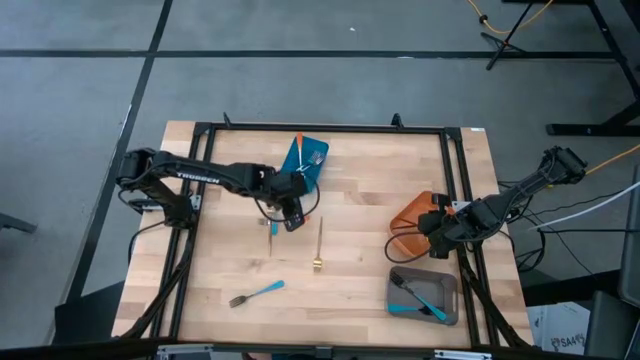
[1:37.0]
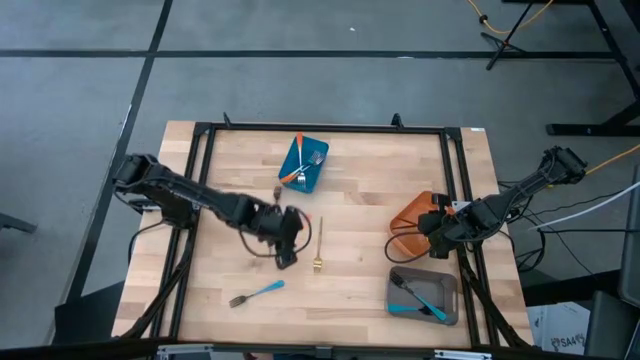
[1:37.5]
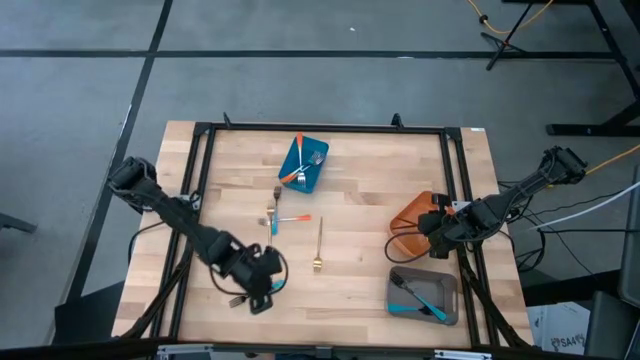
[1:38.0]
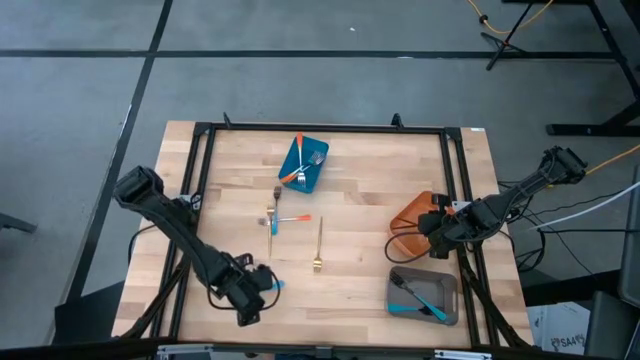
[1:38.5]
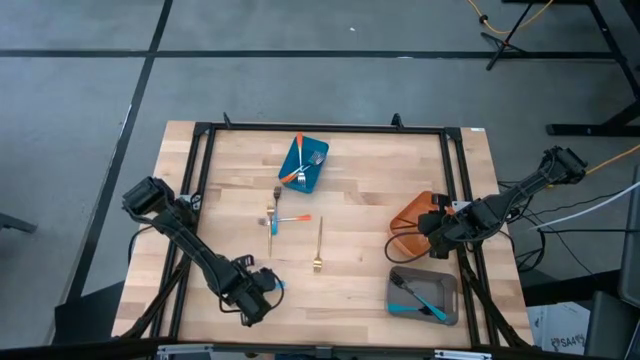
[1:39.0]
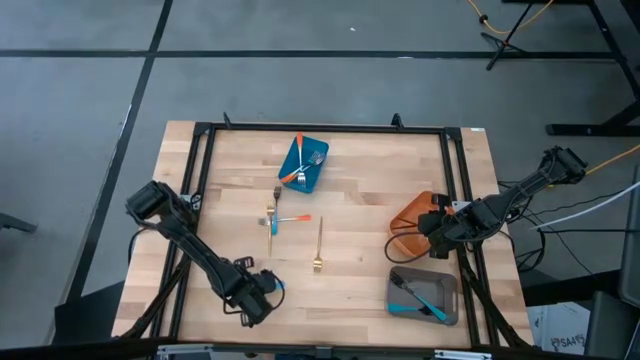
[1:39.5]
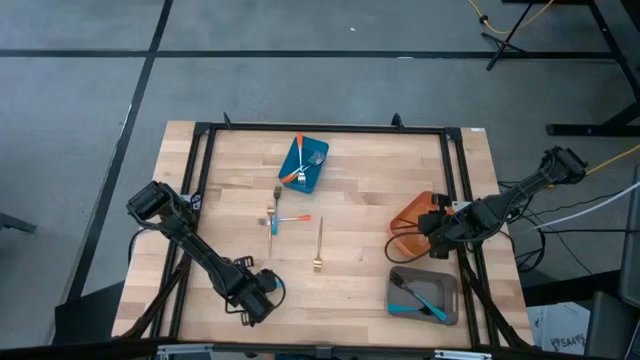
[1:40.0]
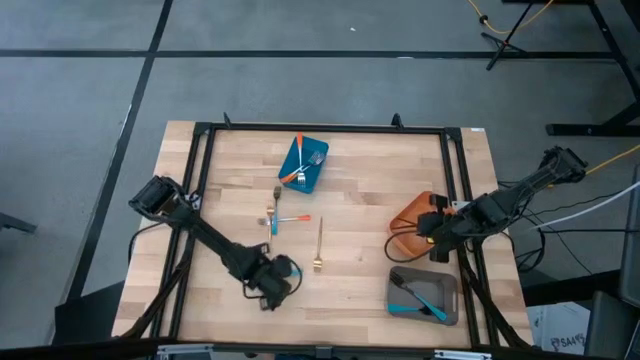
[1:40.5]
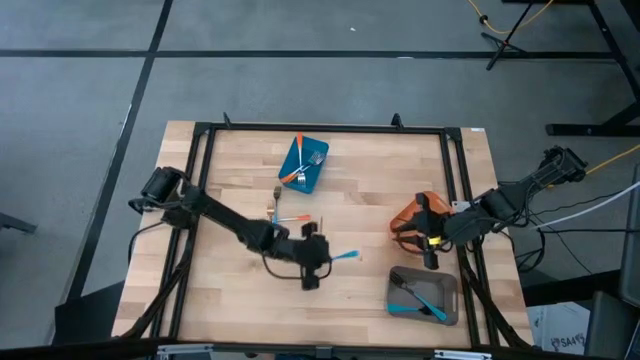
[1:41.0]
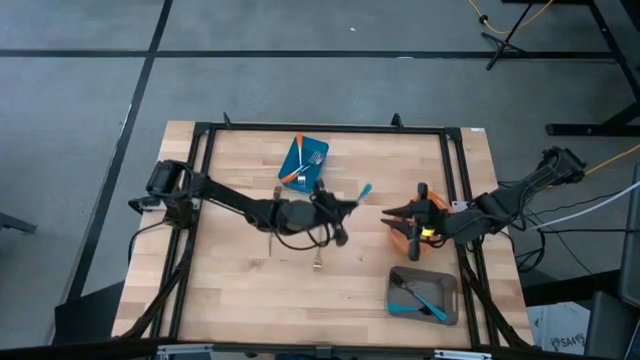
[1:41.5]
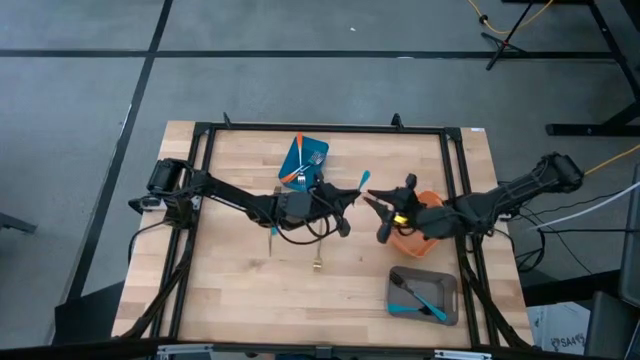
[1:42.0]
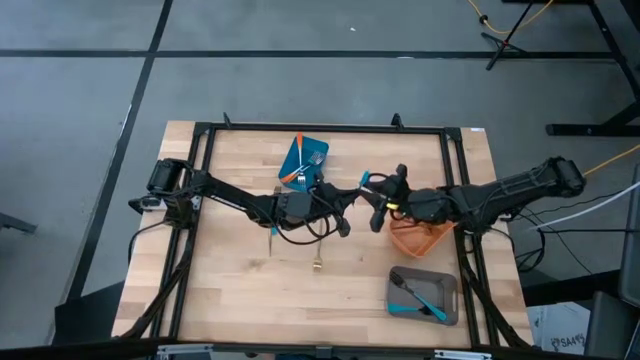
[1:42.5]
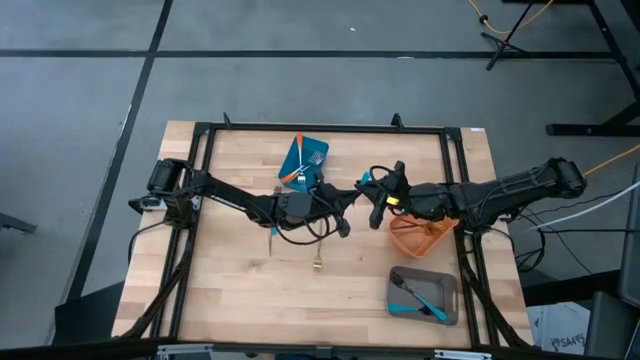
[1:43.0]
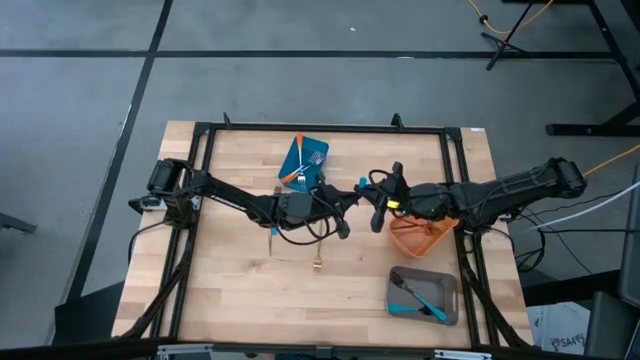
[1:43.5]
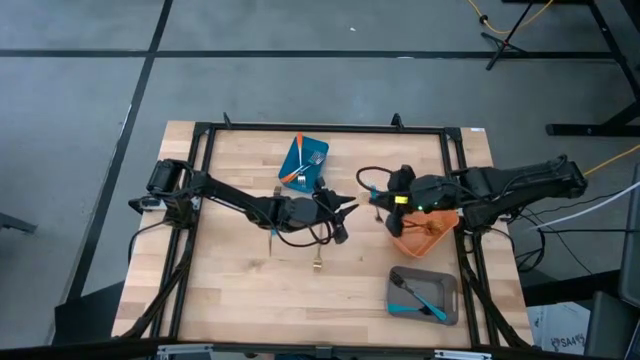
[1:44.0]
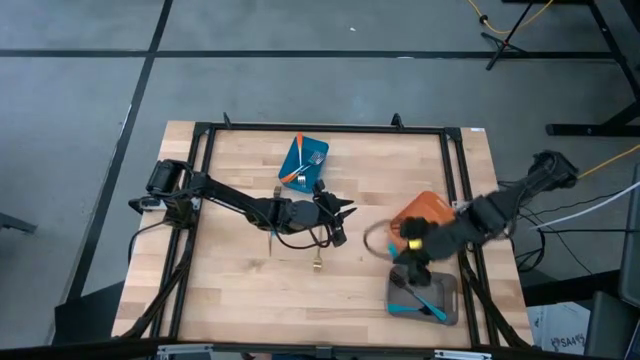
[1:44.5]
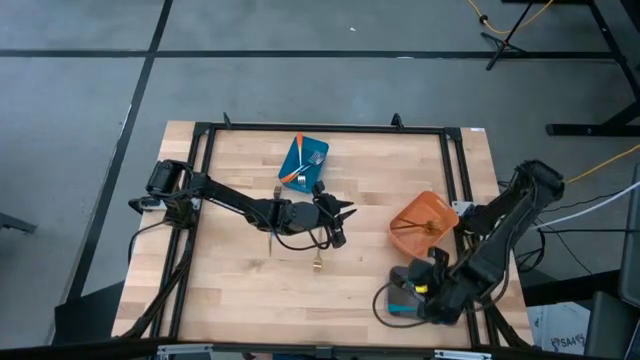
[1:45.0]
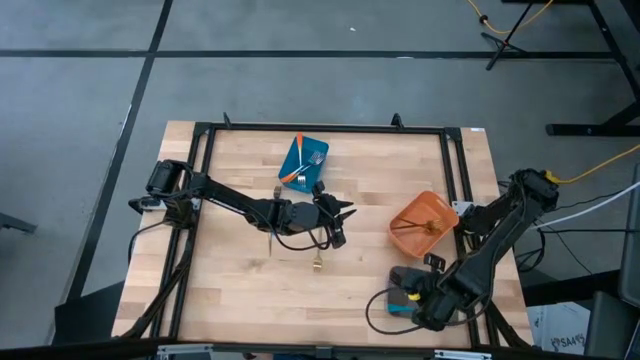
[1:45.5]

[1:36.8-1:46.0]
Task: Sort silverware by color (type)
Put the bottom blue fork into the black bin

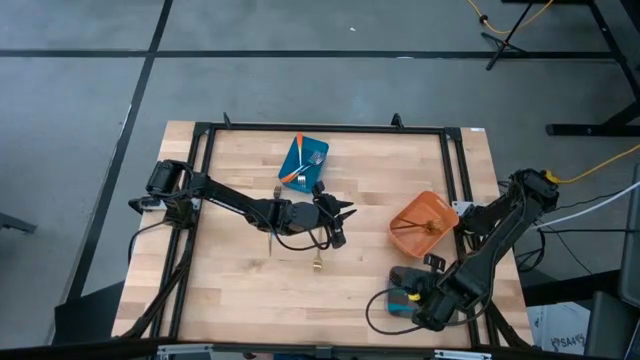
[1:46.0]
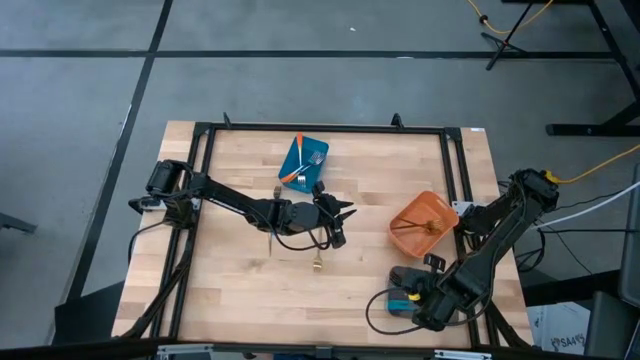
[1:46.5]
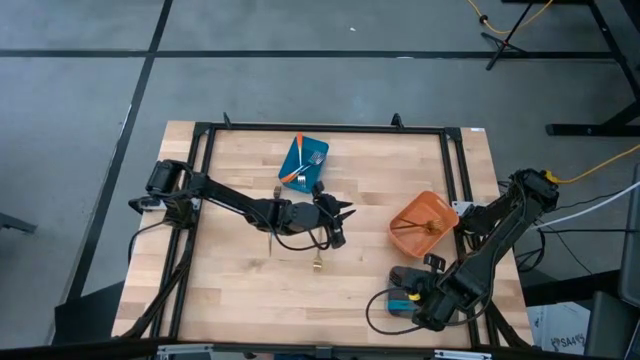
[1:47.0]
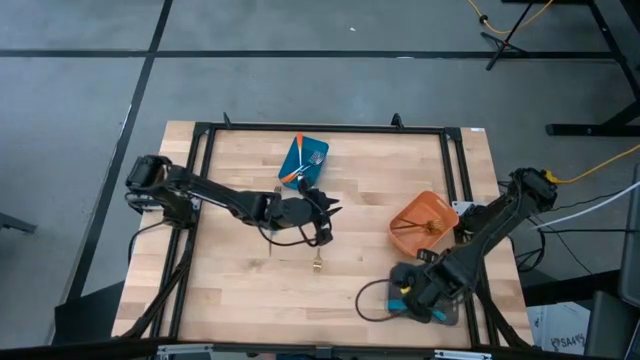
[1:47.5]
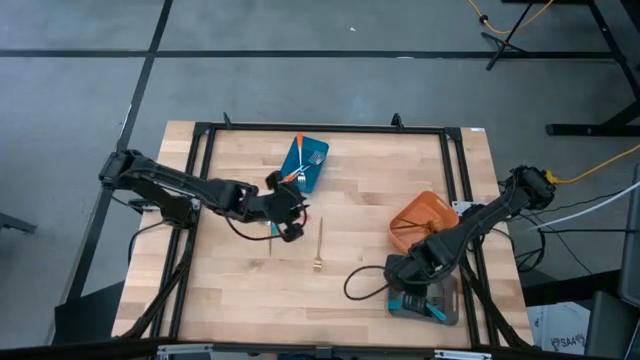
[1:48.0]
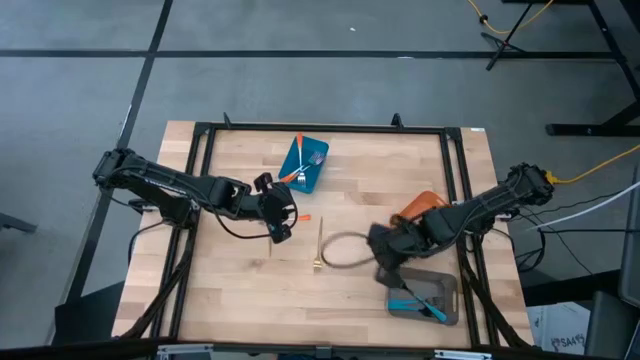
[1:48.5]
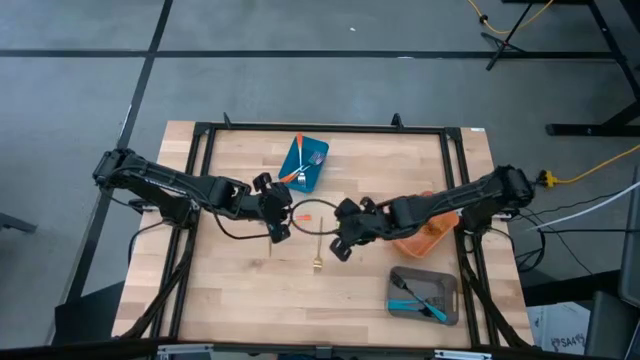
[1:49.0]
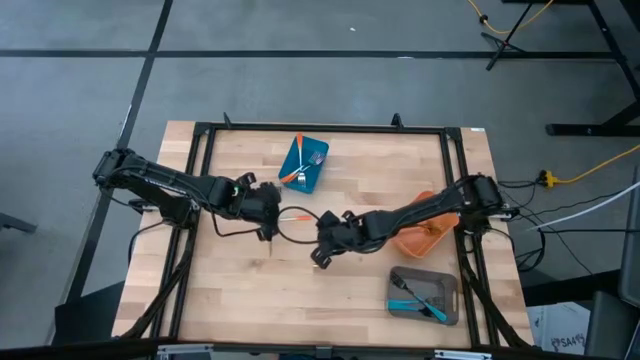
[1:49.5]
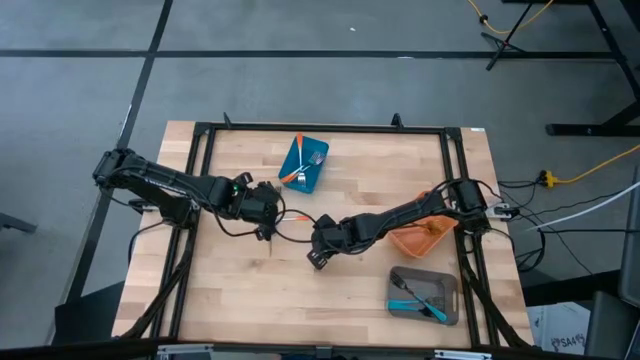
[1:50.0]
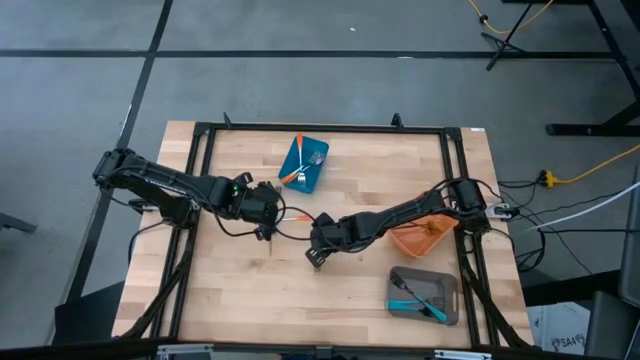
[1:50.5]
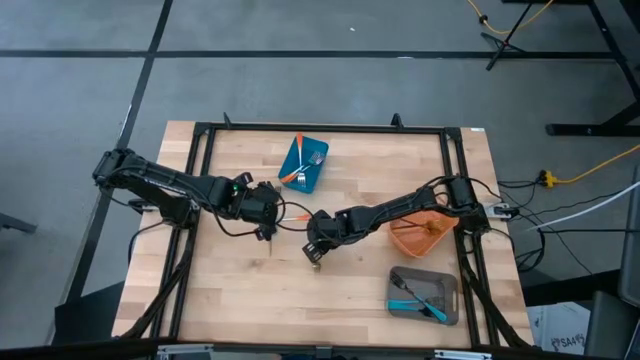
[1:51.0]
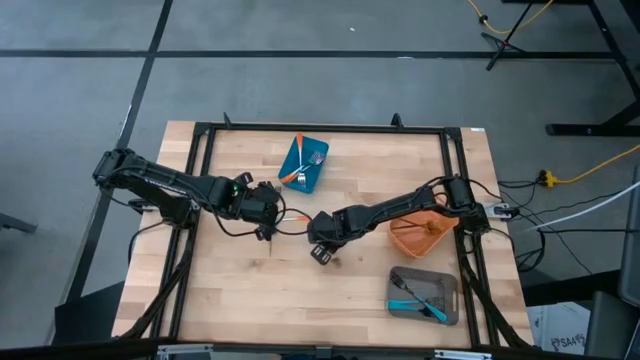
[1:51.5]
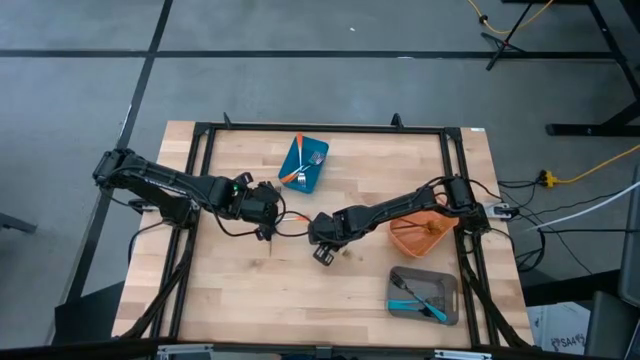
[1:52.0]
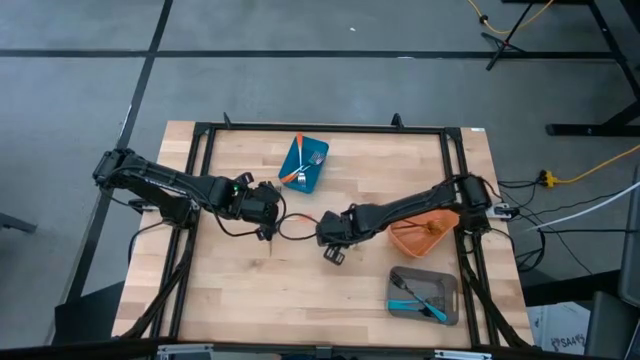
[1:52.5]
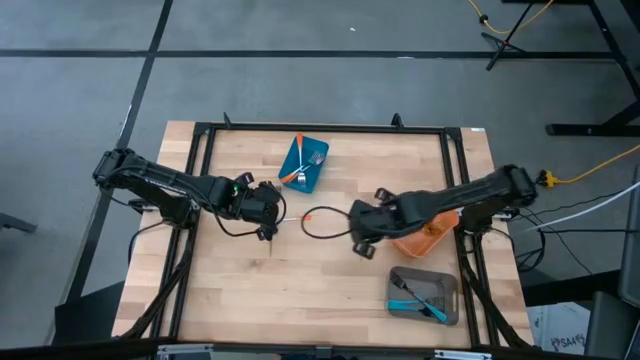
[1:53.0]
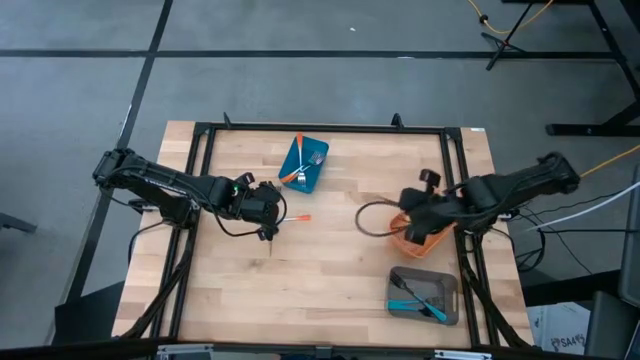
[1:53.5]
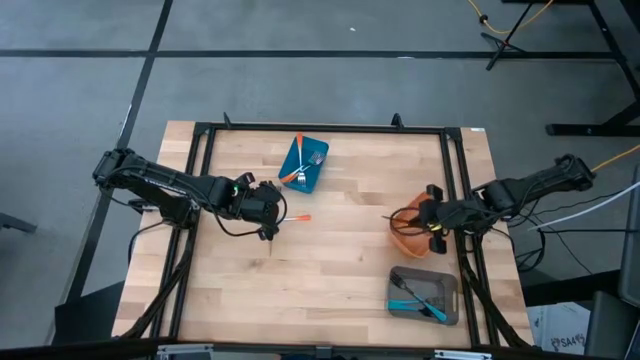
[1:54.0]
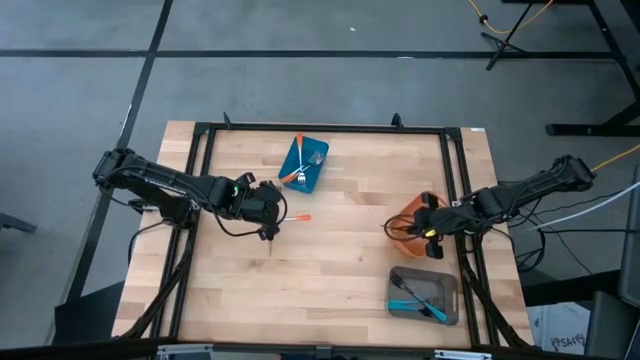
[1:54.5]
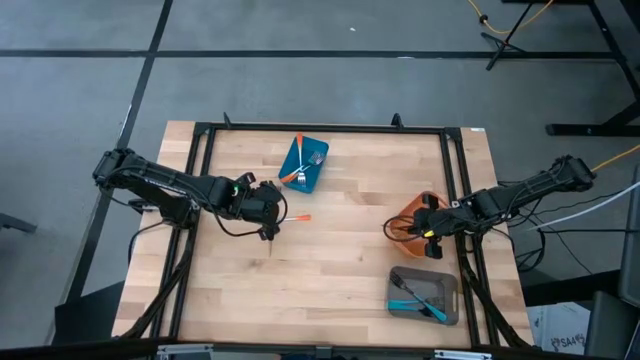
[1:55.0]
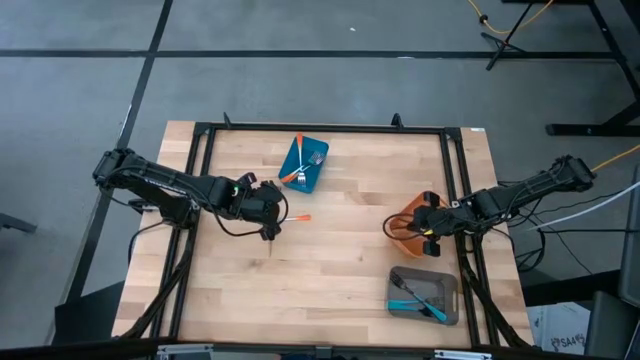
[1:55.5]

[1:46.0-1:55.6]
Put the right gold fork into the orange bin

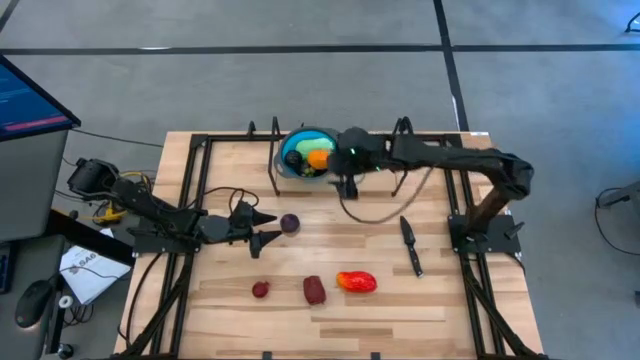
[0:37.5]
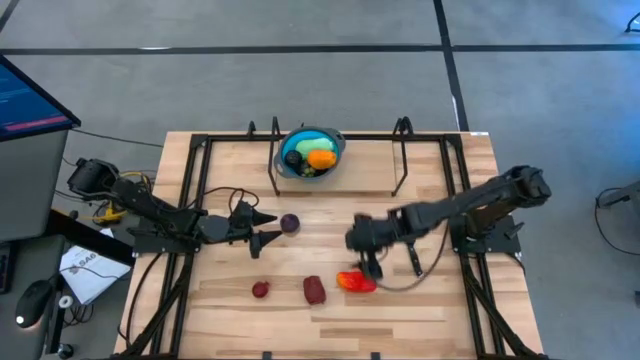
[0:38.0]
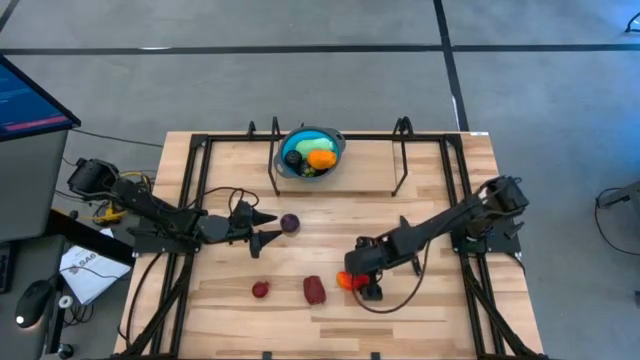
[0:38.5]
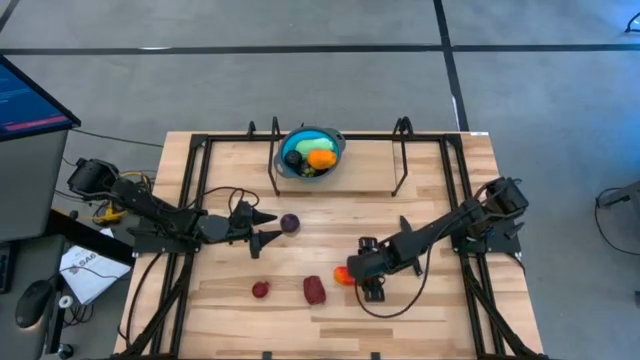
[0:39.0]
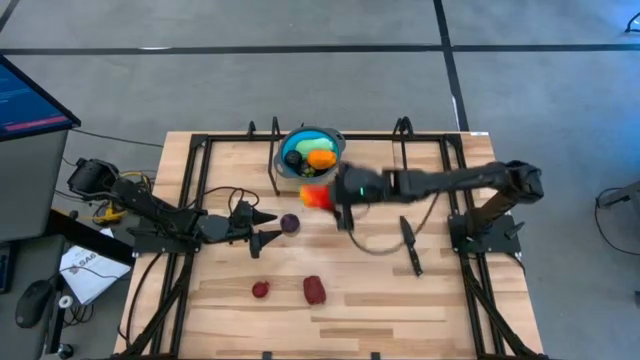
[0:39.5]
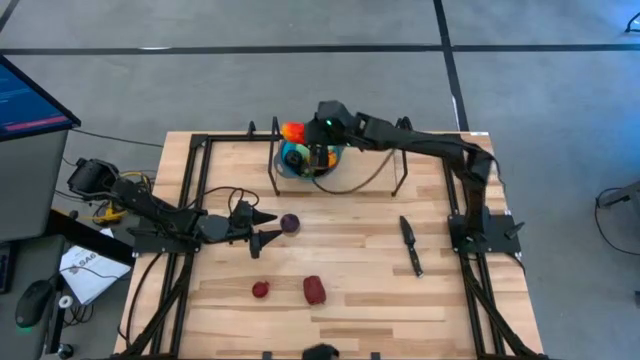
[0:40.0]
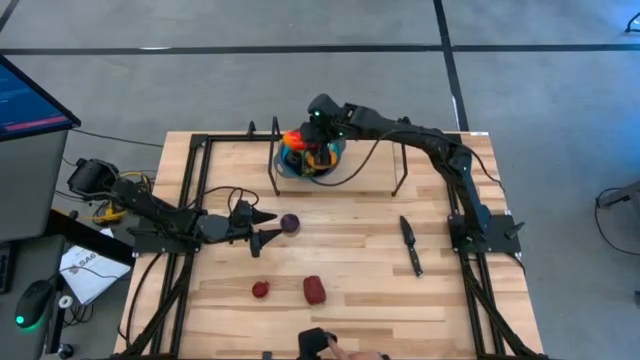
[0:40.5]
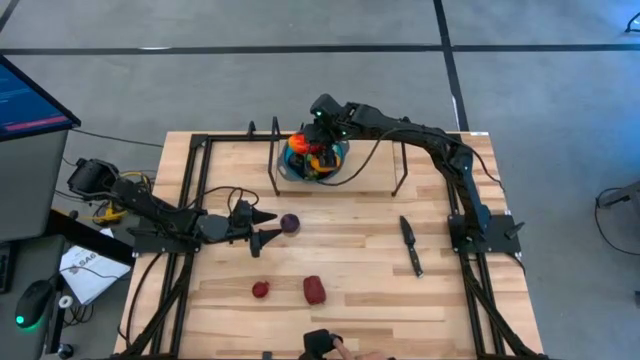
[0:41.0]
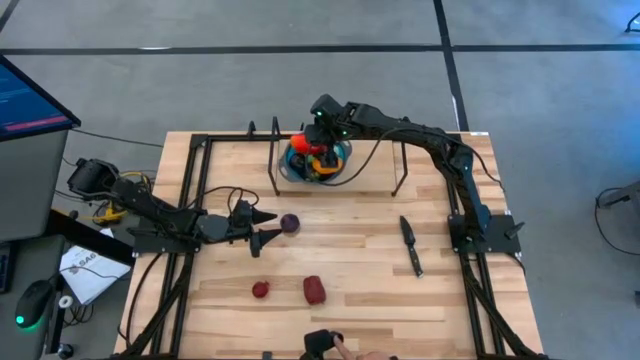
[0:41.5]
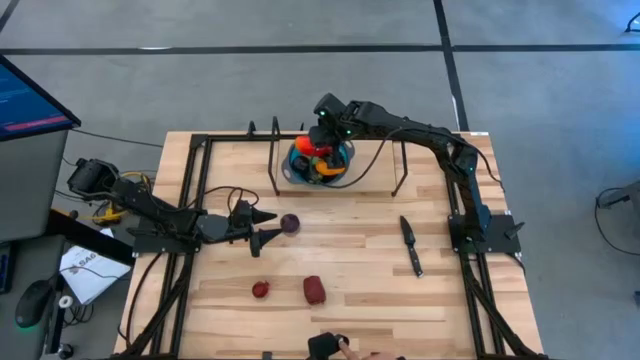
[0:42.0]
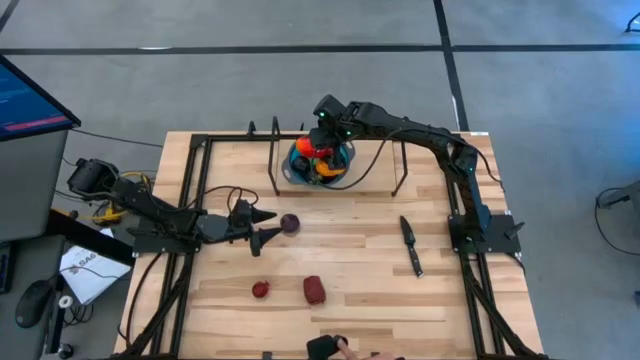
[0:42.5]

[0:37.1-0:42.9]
Task: Pick & Place Fruit
Put the orange mango into the blue strainer bowl on the shelf
